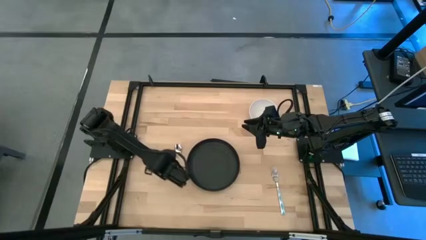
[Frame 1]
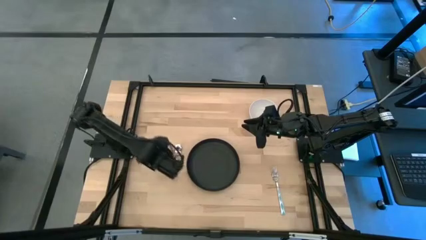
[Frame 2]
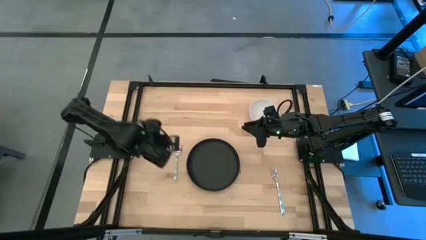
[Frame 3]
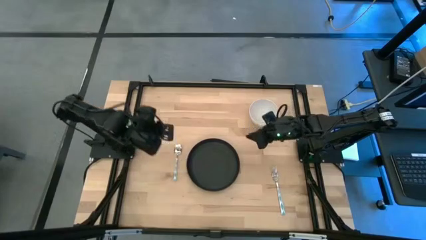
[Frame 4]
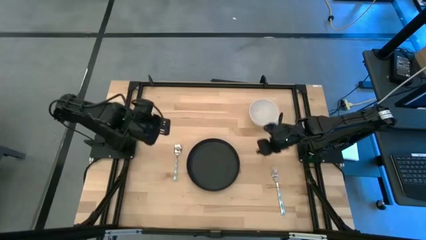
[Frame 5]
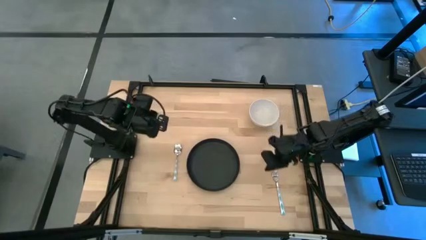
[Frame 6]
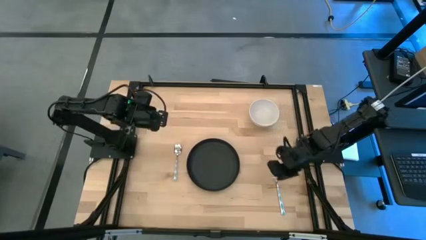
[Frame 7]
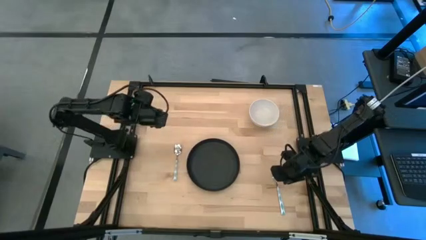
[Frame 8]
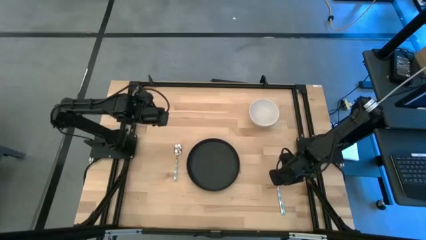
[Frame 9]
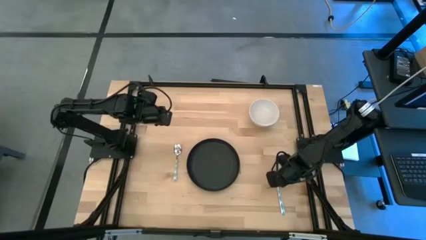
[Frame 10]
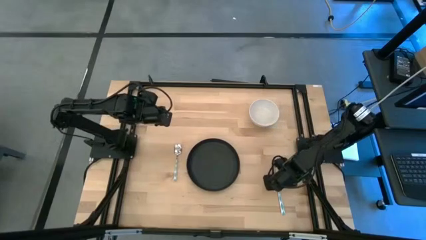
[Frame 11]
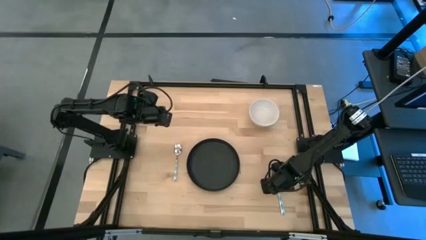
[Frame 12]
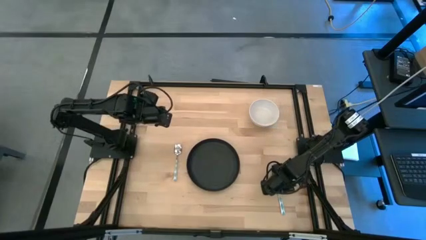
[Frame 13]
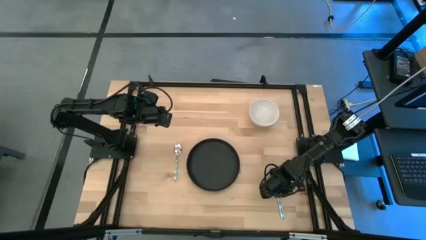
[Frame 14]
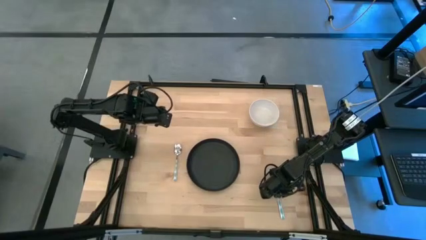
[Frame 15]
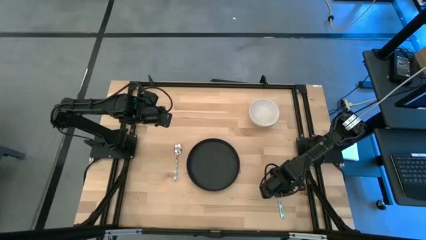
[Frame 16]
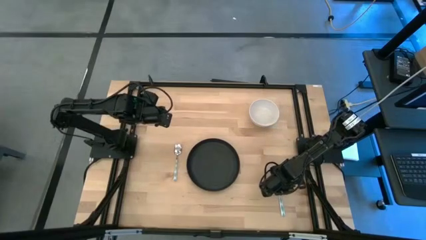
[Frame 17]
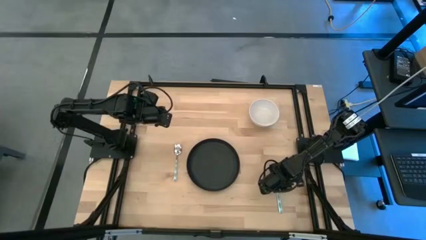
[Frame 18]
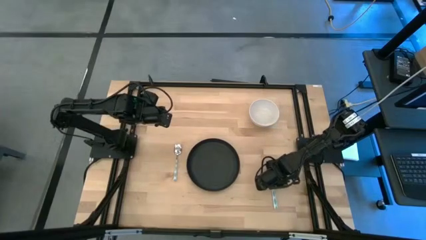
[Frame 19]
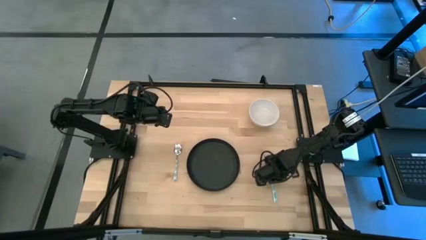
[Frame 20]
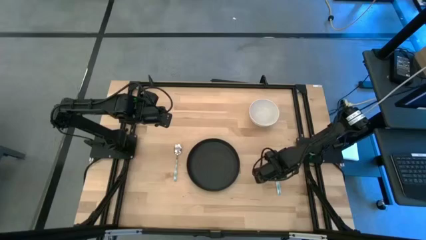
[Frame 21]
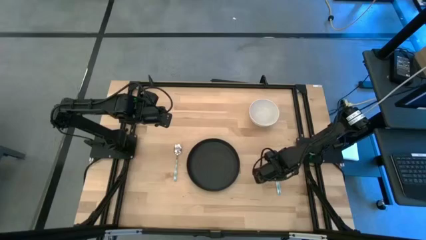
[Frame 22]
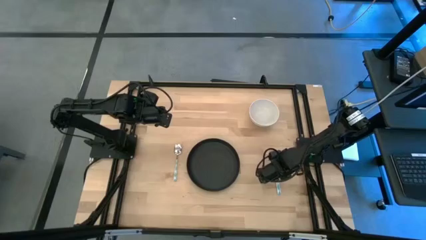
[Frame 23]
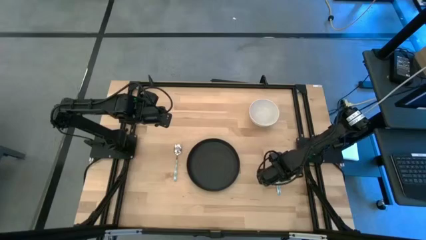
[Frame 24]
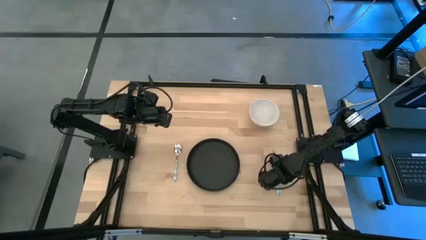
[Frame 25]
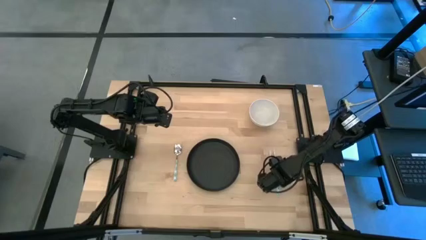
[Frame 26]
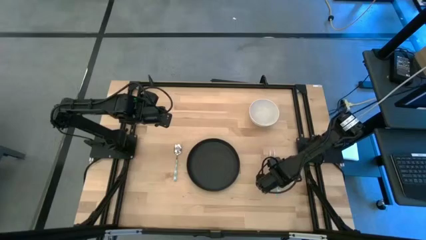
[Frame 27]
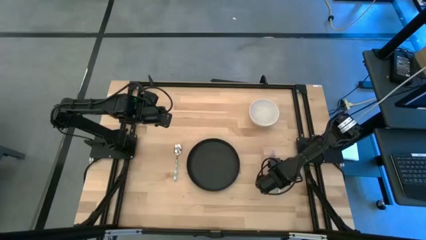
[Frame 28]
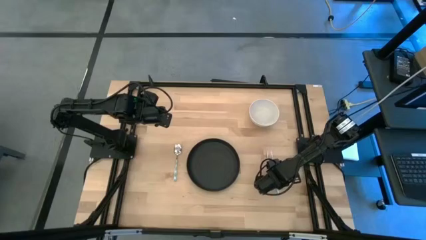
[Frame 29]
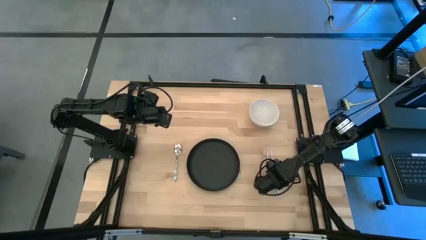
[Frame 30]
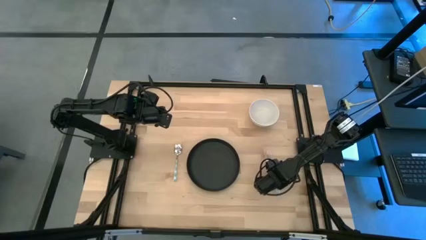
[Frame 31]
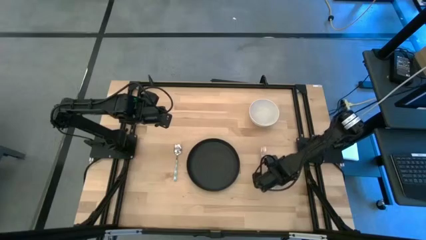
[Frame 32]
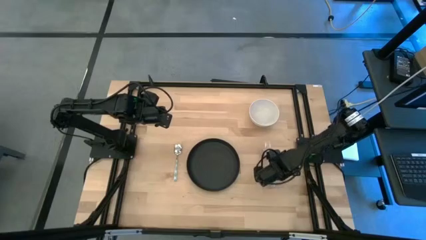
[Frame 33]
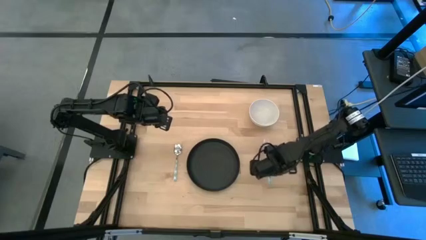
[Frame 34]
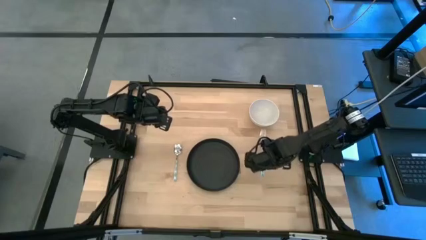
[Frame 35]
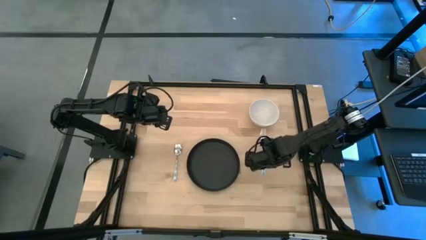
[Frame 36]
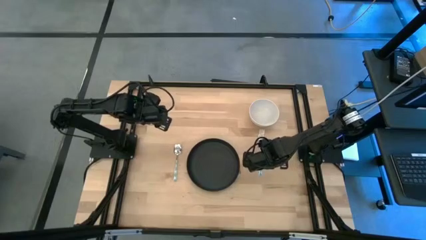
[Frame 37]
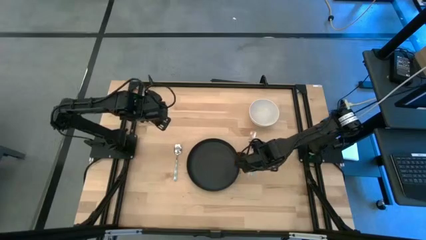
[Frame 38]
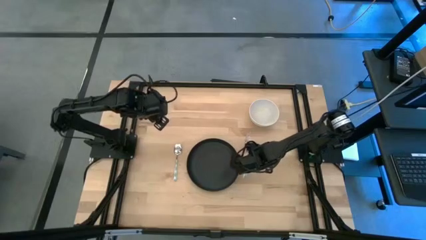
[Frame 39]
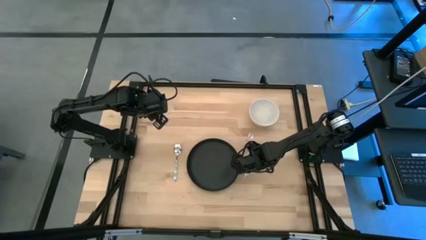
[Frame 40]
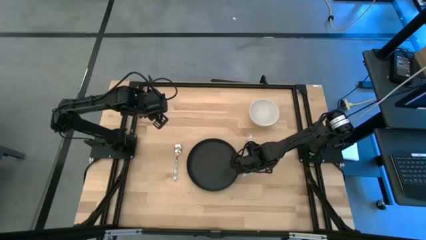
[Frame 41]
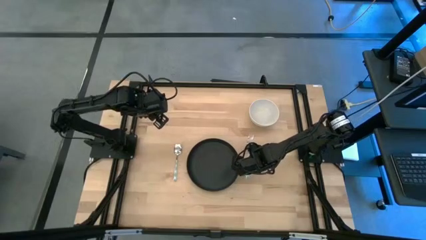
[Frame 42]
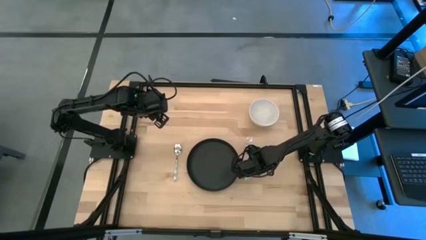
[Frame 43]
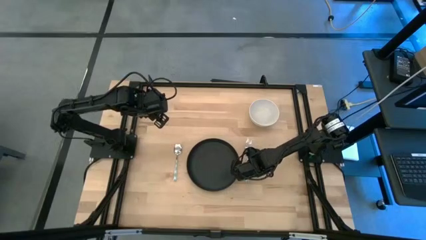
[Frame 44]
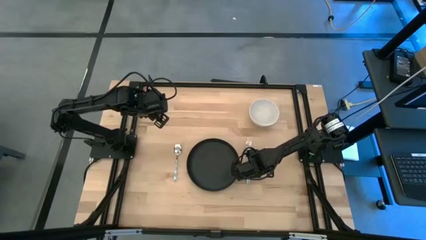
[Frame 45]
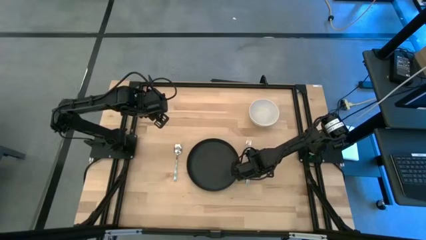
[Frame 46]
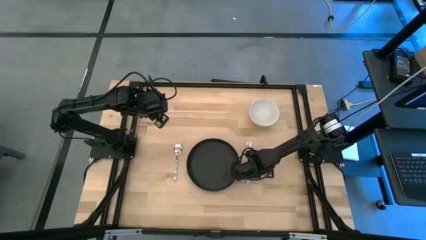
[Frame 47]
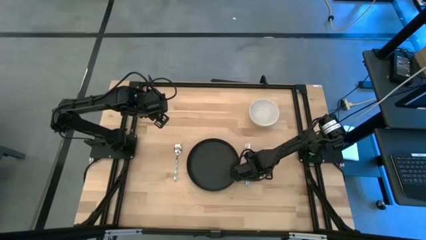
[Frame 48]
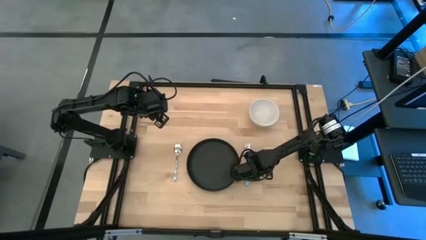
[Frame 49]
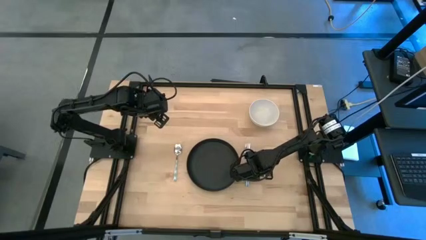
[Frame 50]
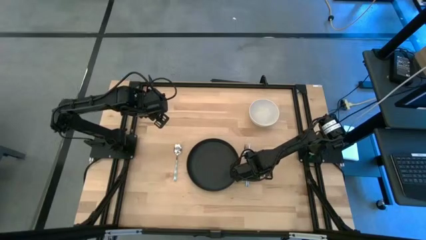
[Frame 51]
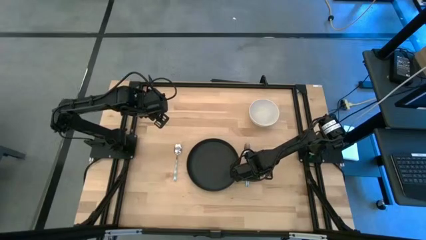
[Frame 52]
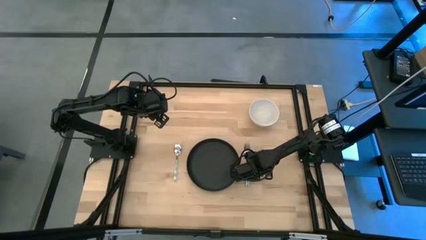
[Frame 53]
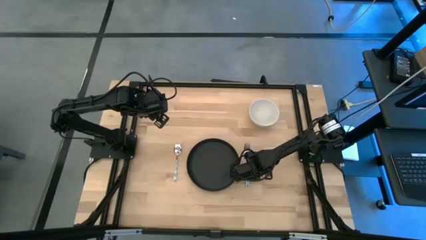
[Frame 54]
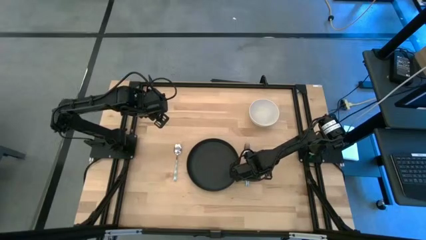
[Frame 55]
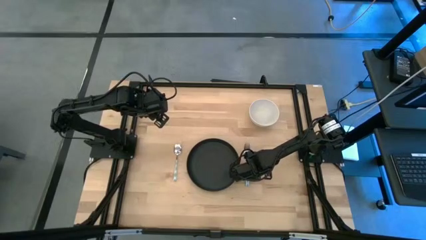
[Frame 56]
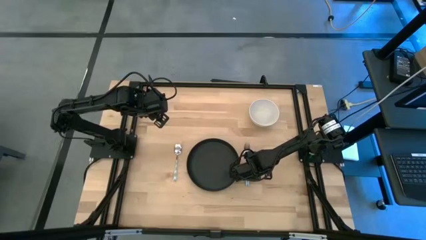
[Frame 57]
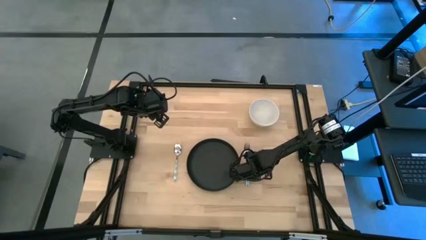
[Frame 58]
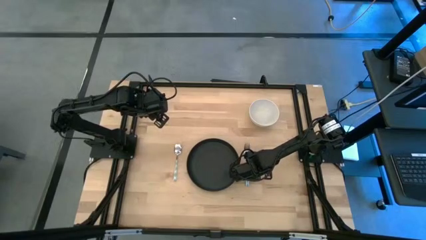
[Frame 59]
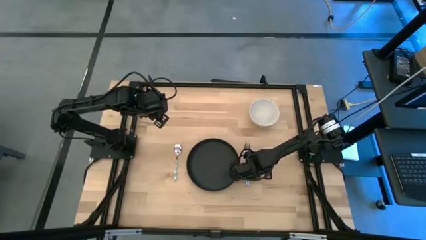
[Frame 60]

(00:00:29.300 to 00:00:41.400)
Task: Set table place
Put the green fork on the right side of the black plate
